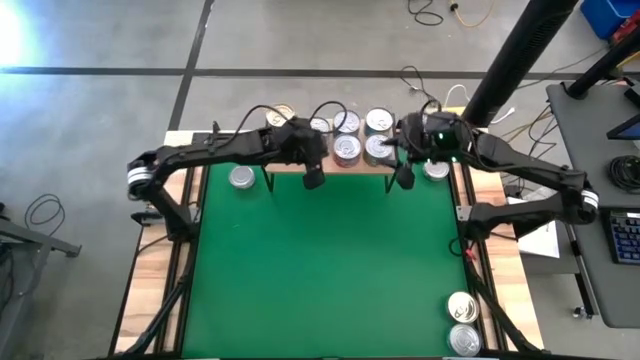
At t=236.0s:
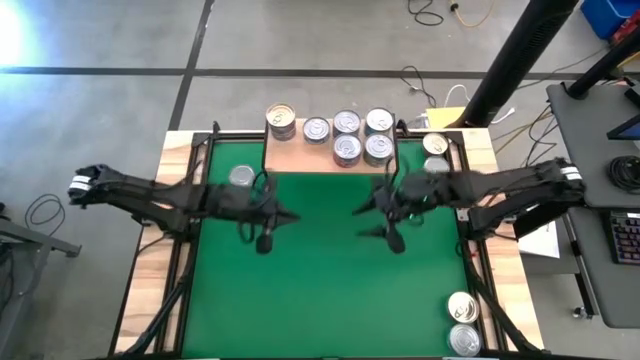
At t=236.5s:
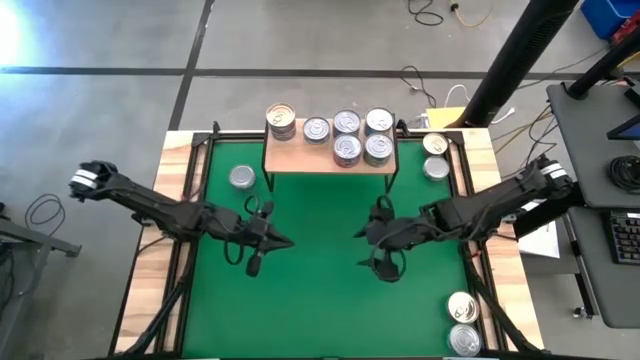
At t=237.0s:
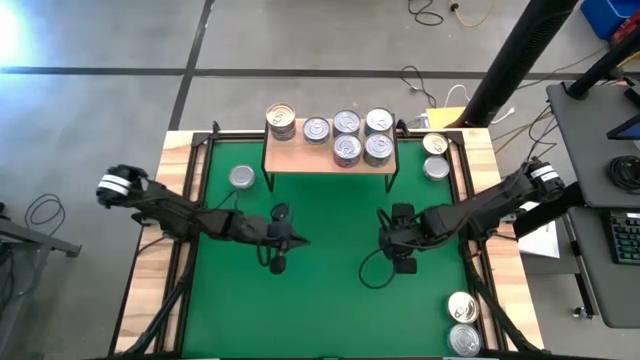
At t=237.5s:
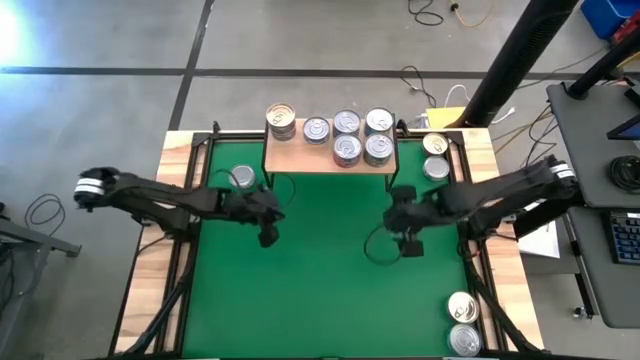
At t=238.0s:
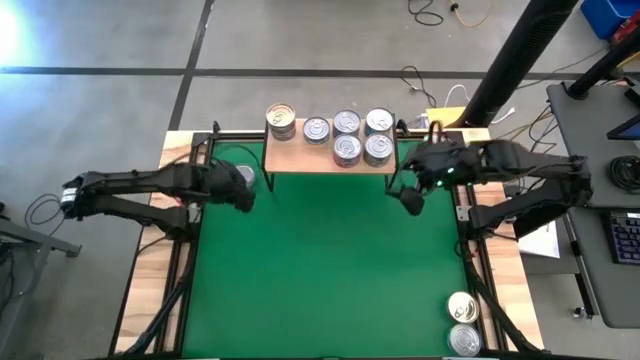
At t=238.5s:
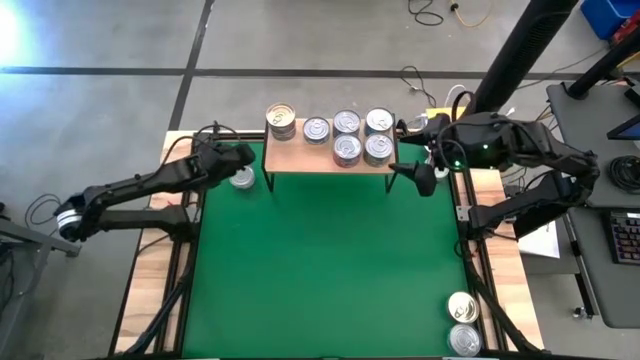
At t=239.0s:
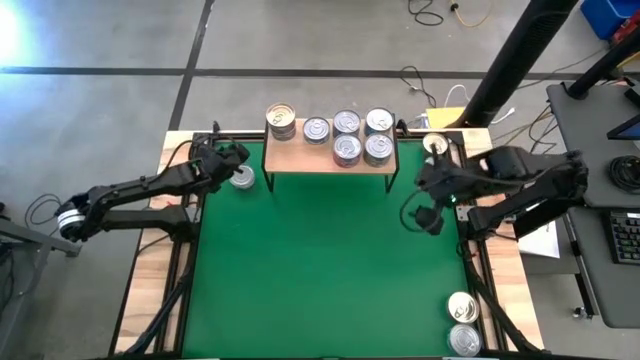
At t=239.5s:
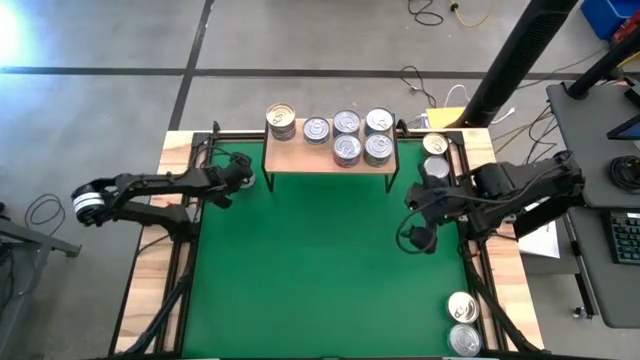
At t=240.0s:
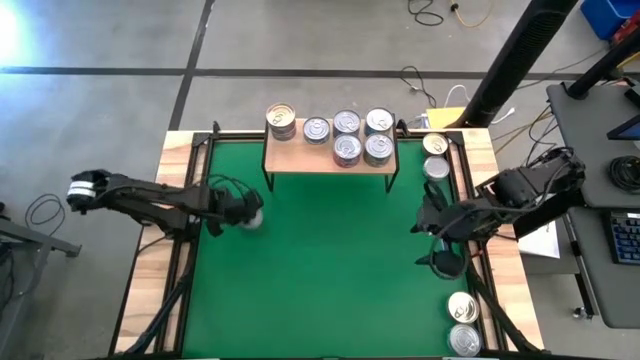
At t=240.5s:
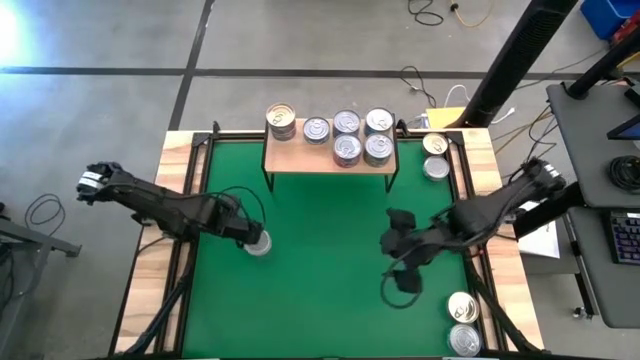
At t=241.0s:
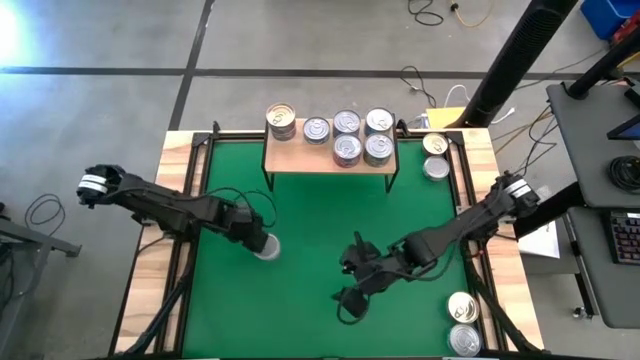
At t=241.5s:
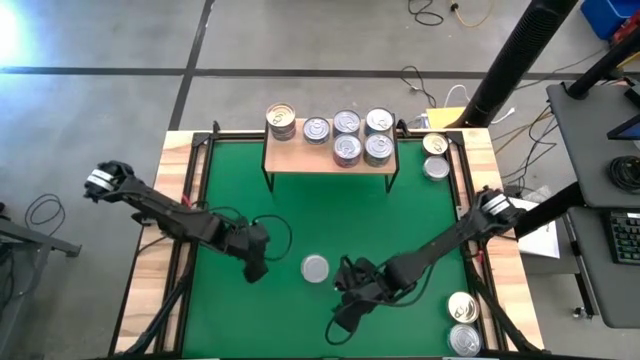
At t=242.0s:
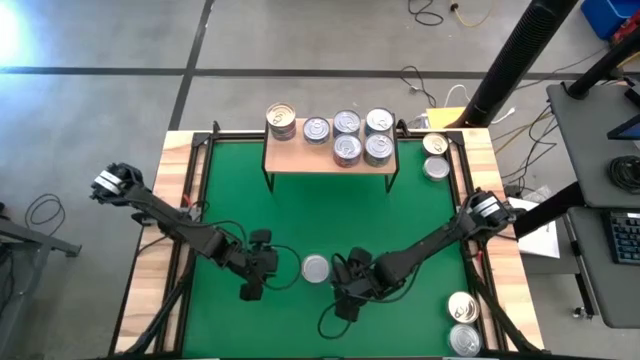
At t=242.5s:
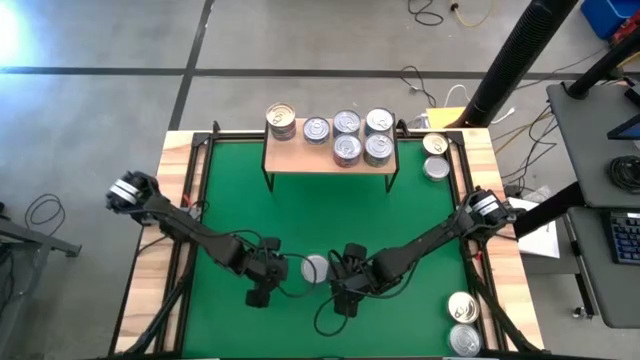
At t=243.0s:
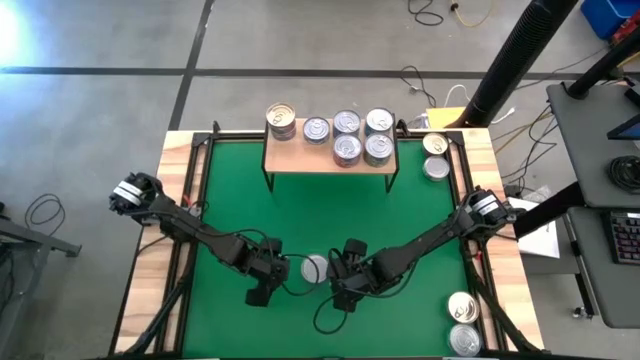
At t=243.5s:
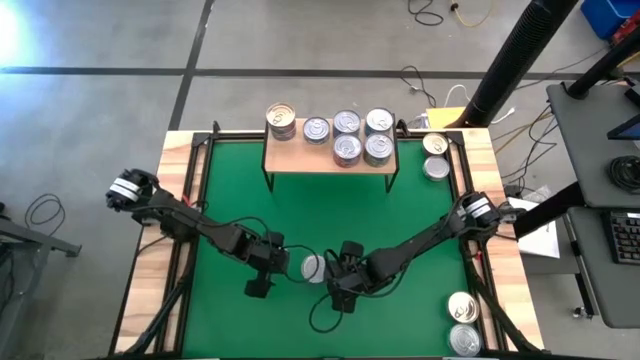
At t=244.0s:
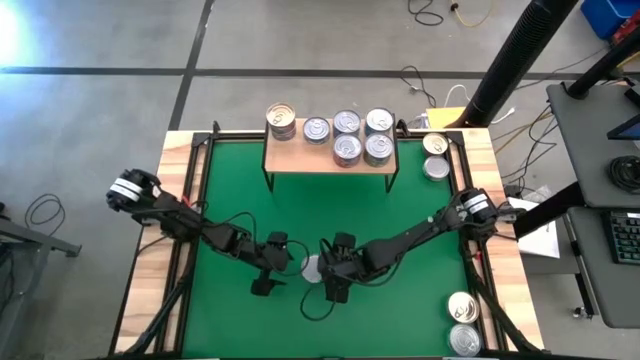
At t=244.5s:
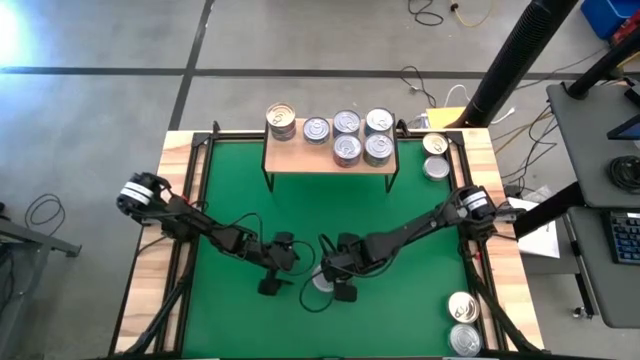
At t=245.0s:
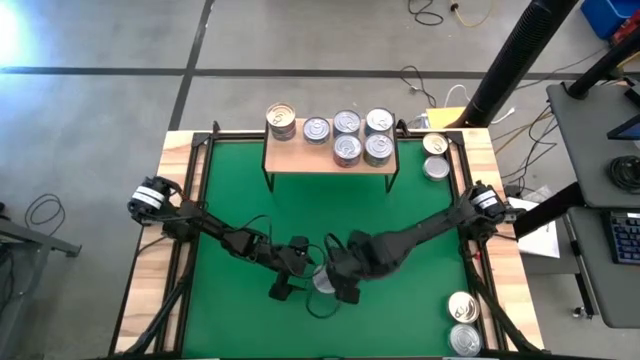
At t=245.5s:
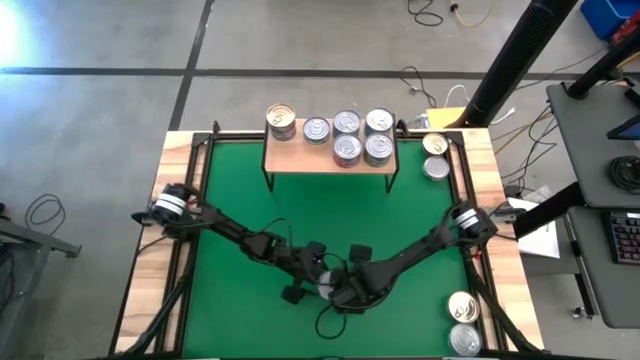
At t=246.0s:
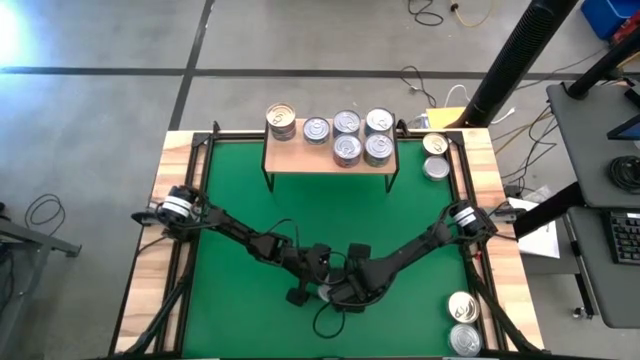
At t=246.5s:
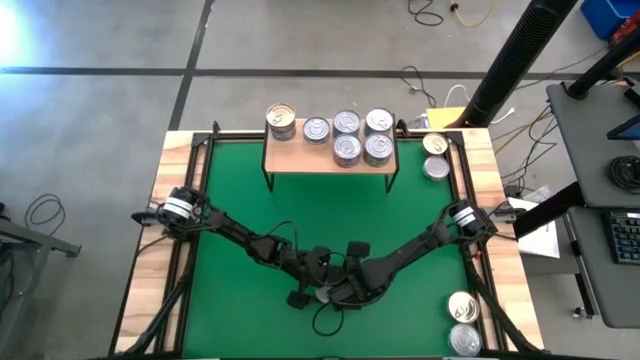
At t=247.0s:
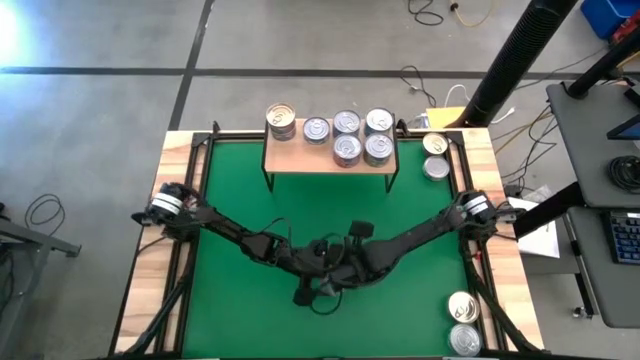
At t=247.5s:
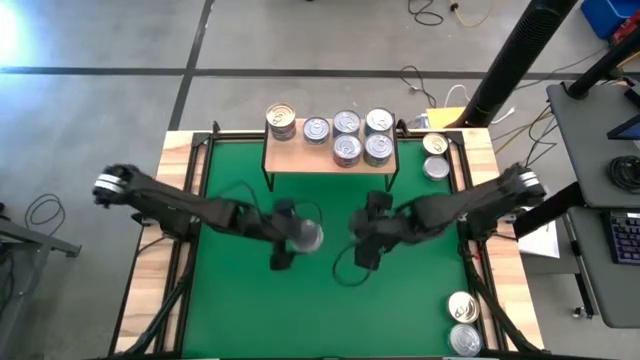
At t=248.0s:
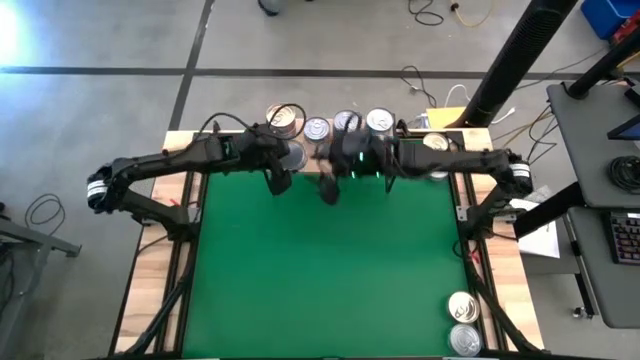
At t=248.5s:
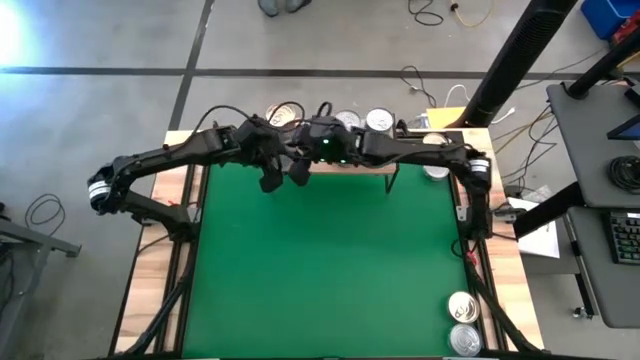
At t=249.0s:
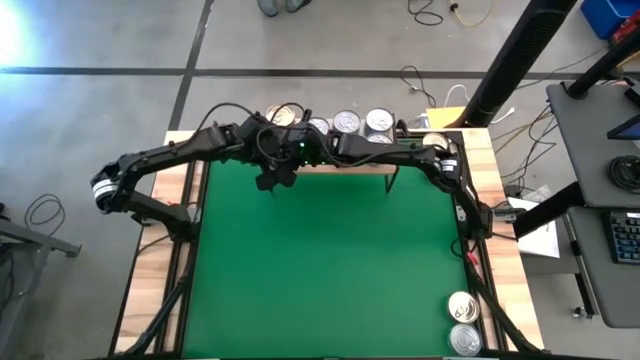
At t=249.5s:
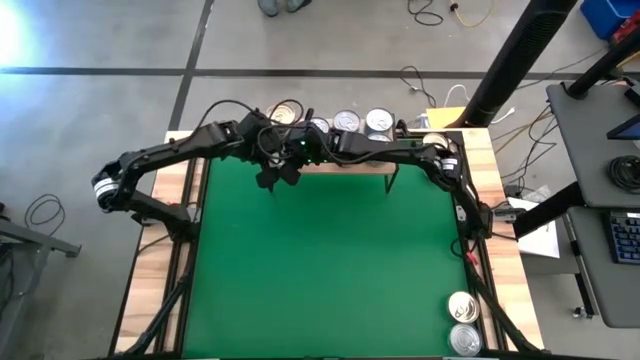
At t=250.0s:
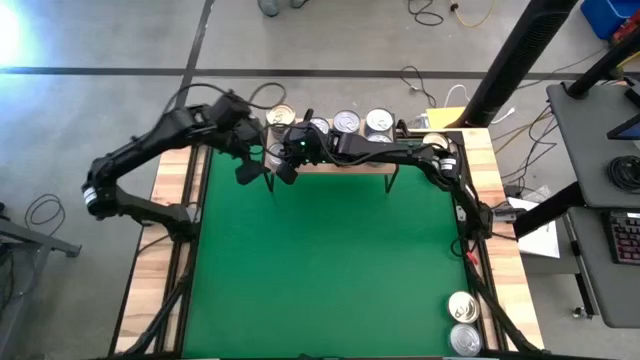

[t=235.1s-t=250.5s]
Task: Stack canned seafood by type on shelf
Put the left green white tuna can on the shelf

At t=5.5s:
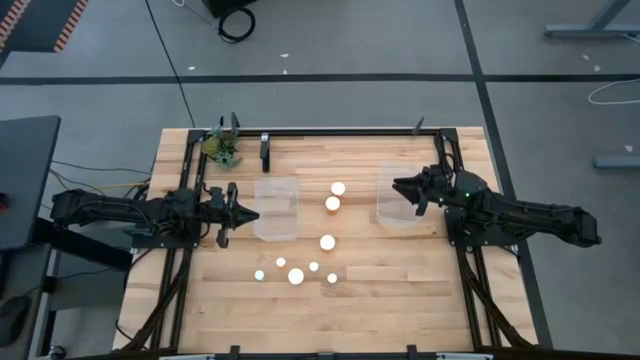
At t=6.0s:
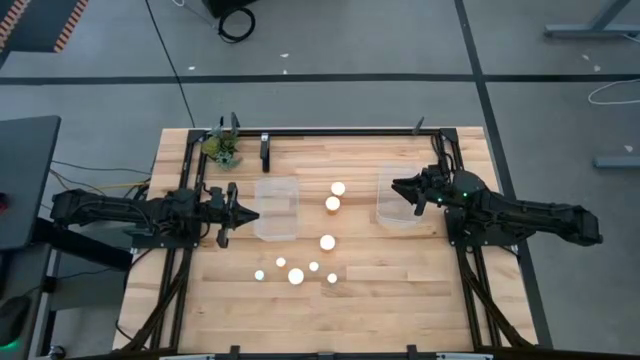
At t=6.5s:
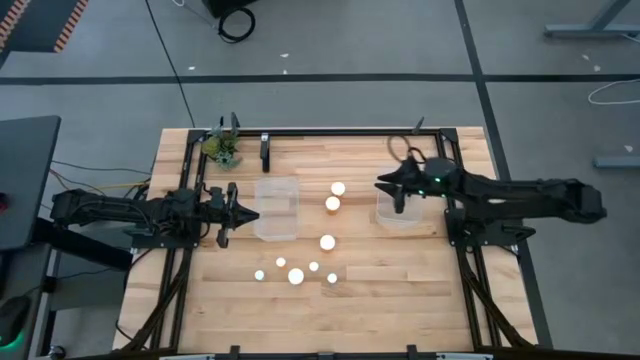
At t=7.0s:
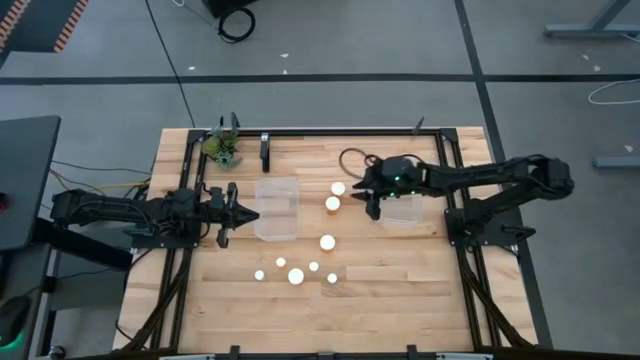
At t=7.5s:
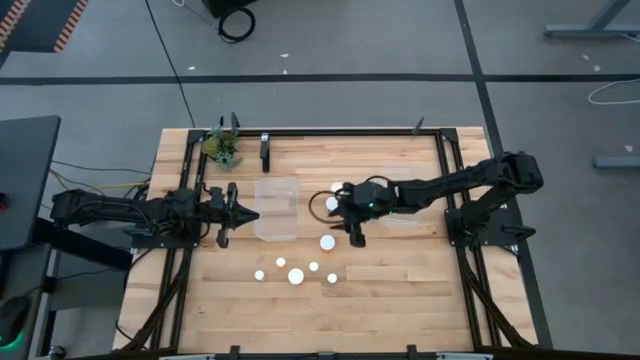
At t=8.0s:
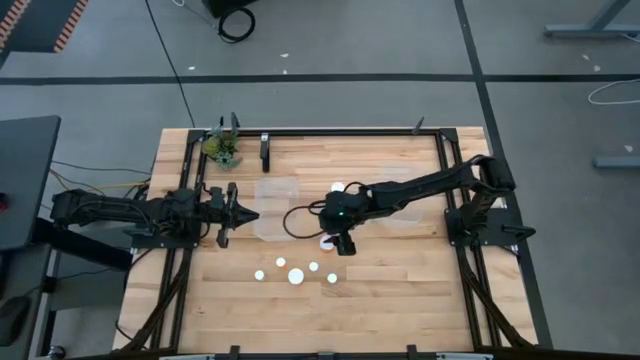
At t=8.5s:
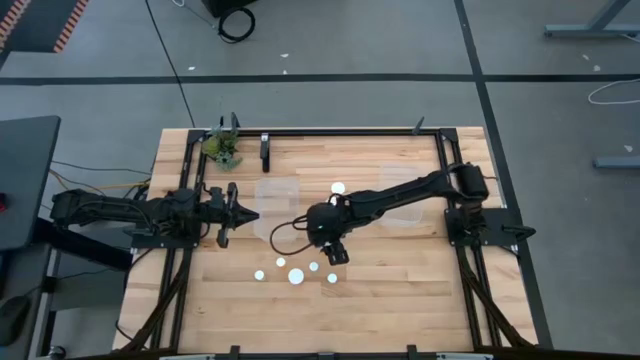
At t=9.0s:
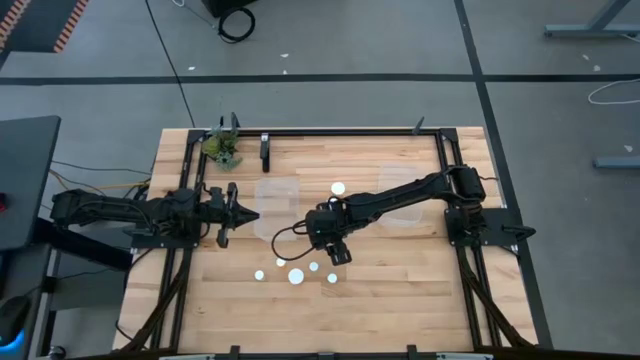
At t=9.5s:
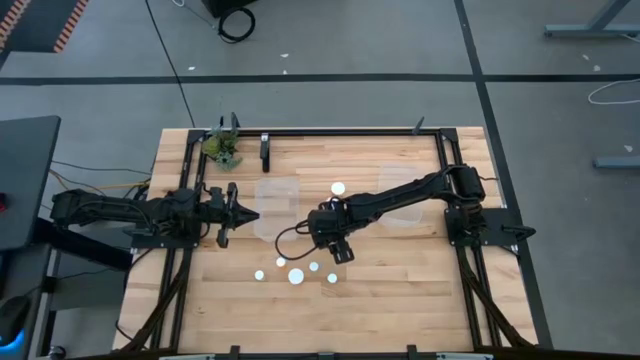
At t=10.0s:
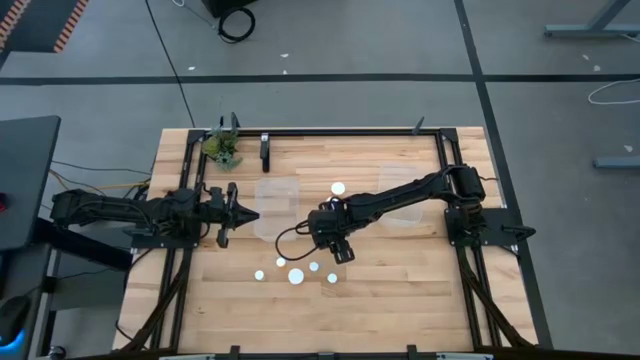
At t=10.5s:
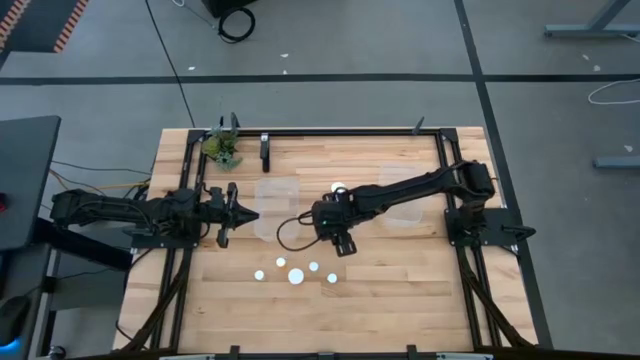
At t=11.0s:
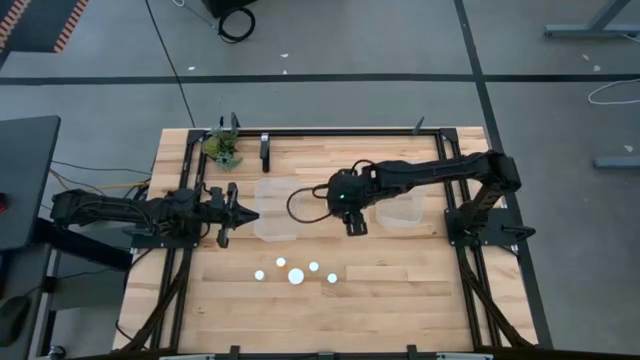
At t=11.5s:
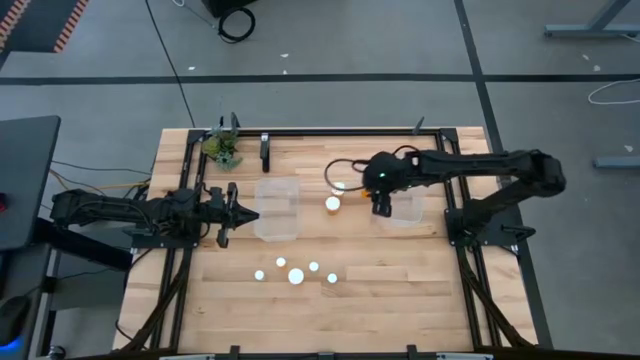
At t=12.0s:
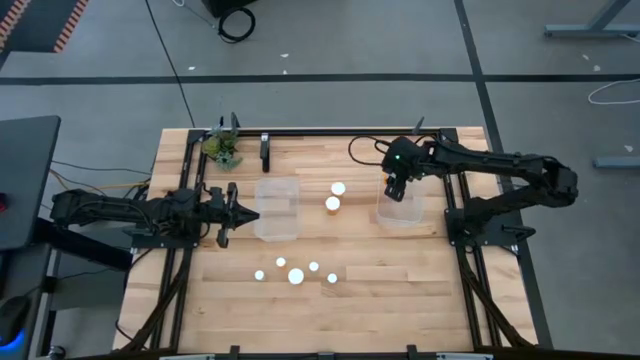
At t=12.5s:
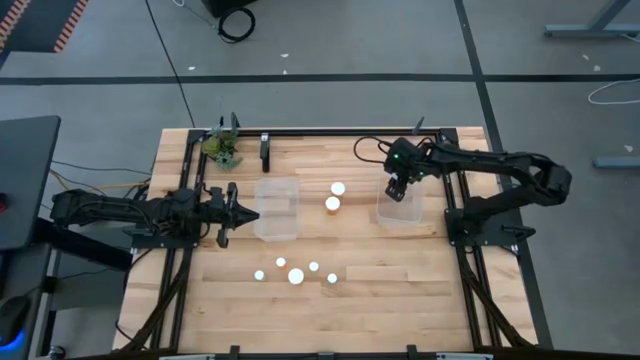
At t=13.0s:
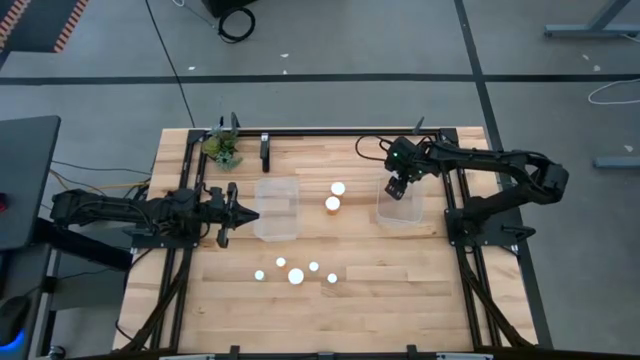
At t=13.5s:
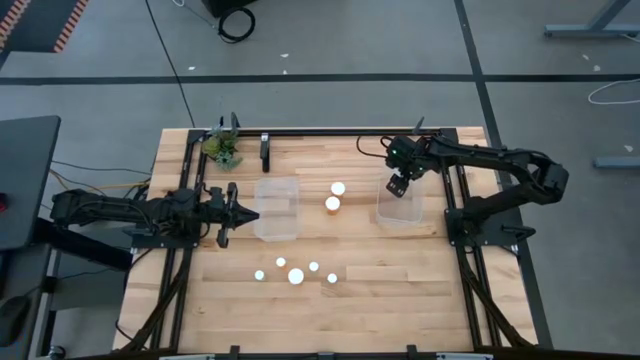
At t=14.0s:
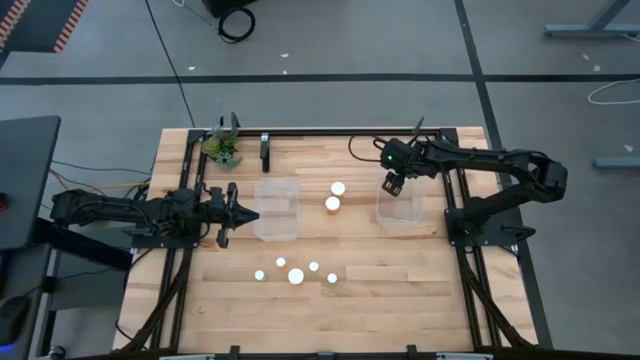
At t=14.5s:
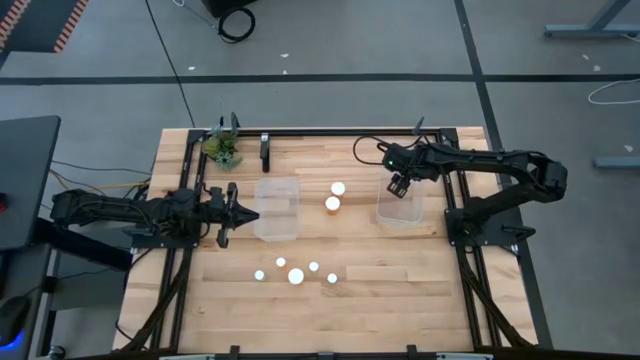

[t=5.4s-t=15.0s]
Task: Pick and place medicine bottles into bin by pill shape (circle, oval)
Put the large orange pill bottle into the right transparent bin
